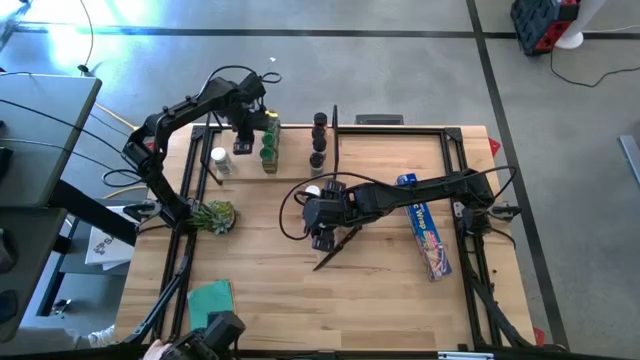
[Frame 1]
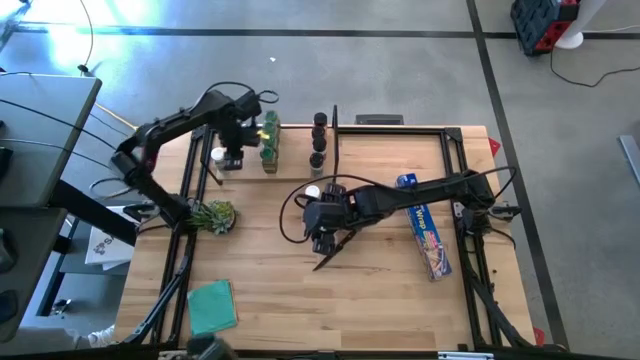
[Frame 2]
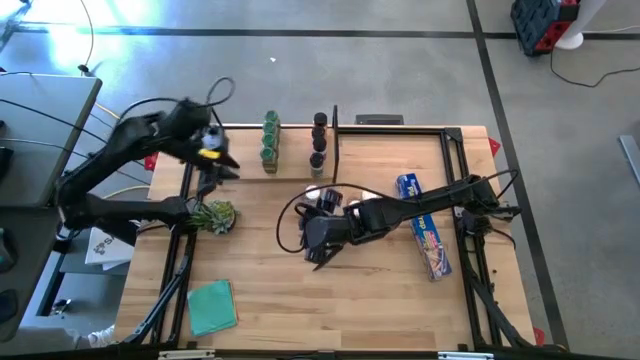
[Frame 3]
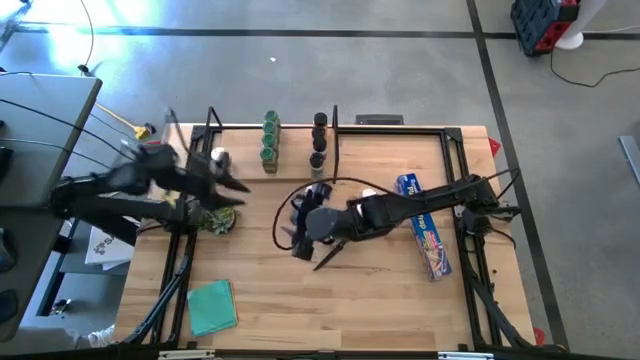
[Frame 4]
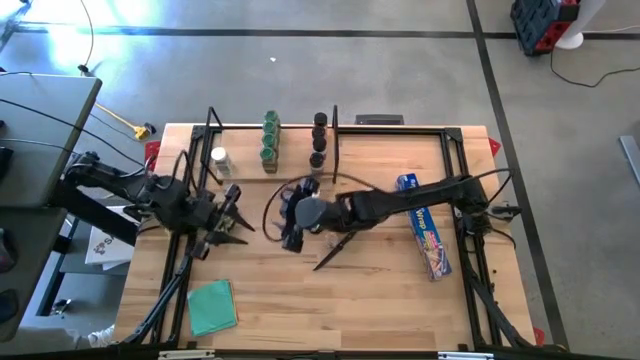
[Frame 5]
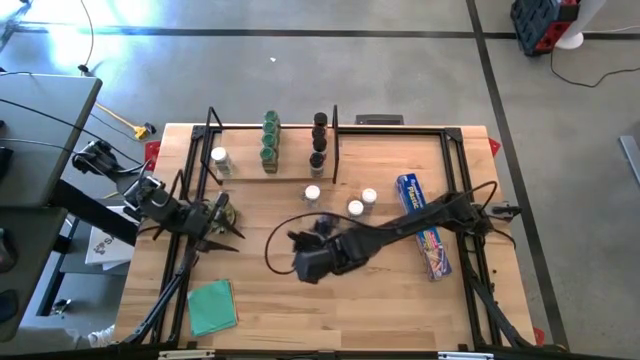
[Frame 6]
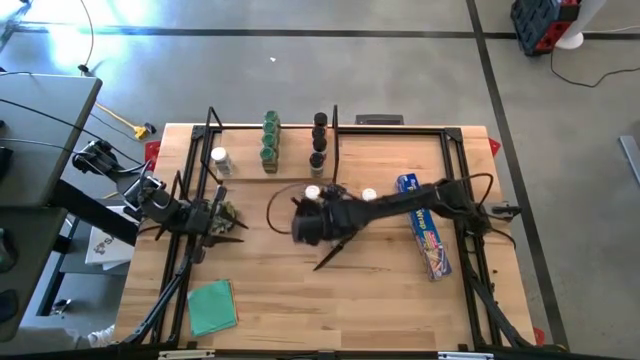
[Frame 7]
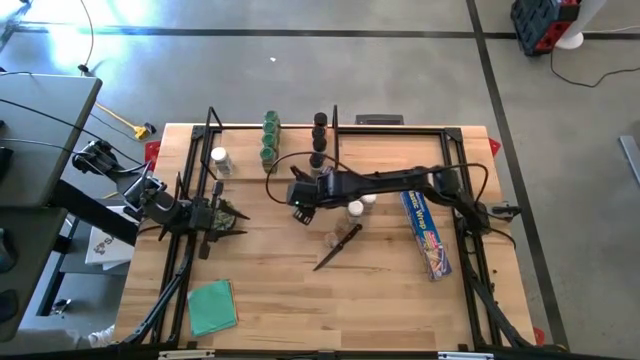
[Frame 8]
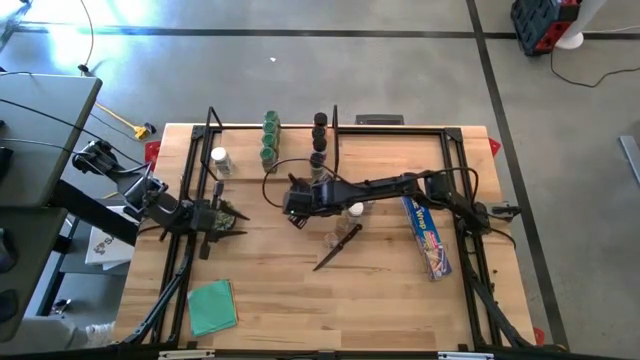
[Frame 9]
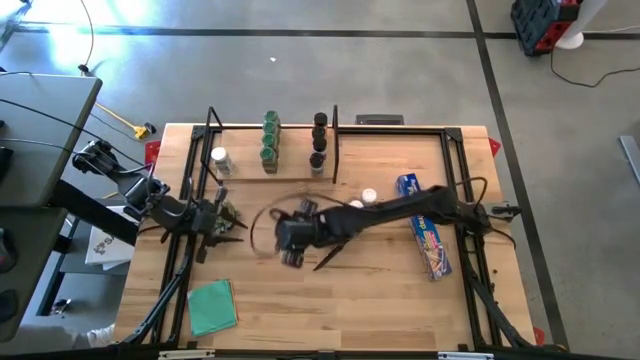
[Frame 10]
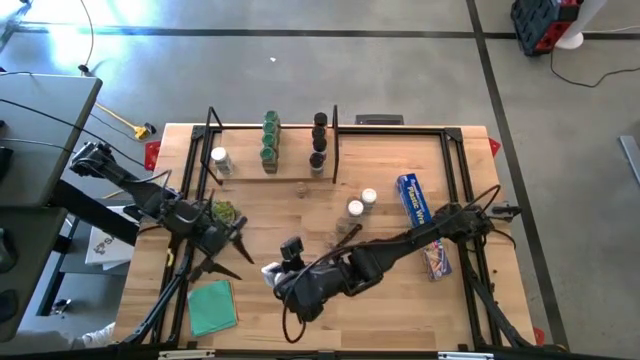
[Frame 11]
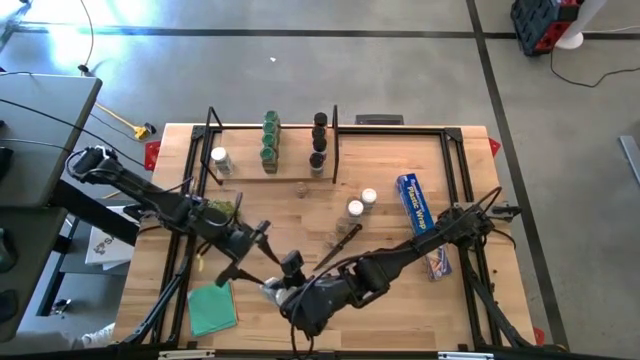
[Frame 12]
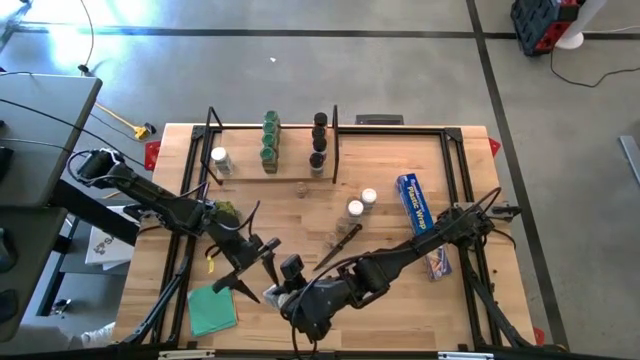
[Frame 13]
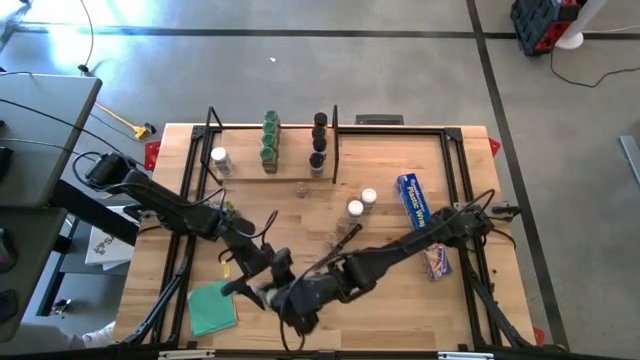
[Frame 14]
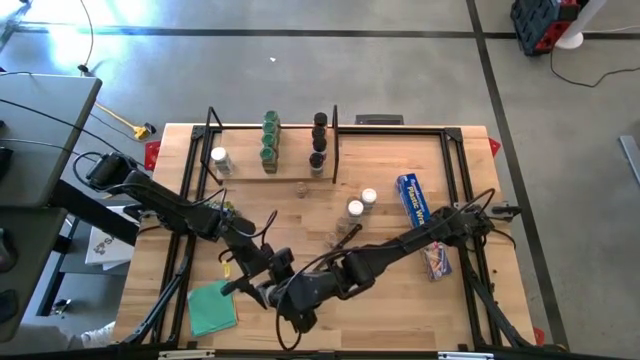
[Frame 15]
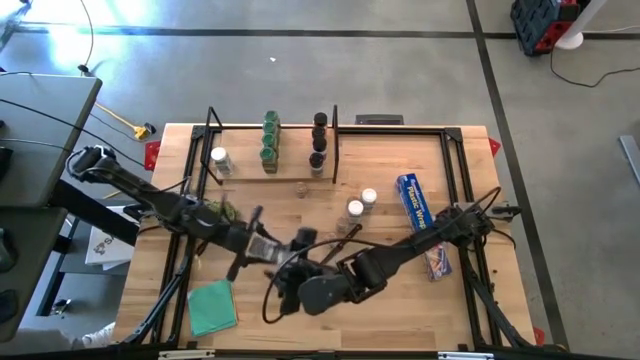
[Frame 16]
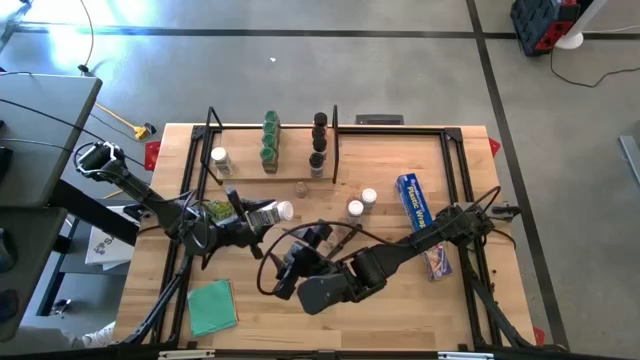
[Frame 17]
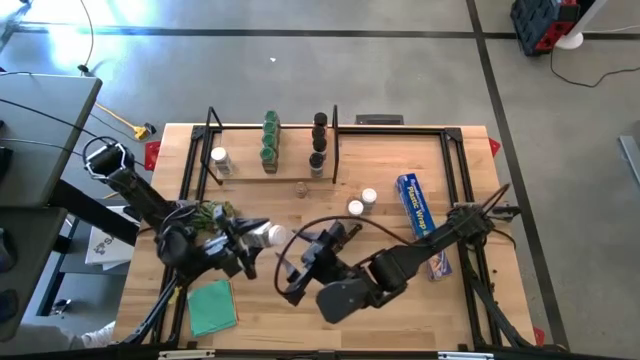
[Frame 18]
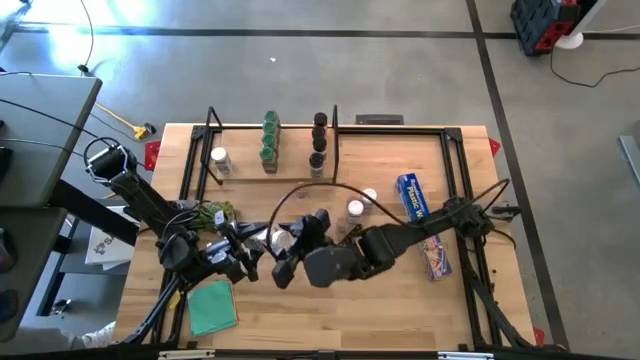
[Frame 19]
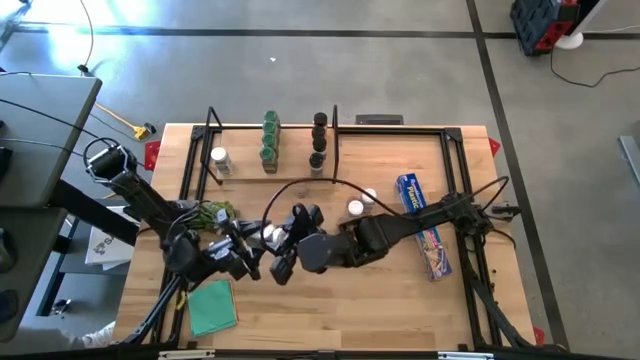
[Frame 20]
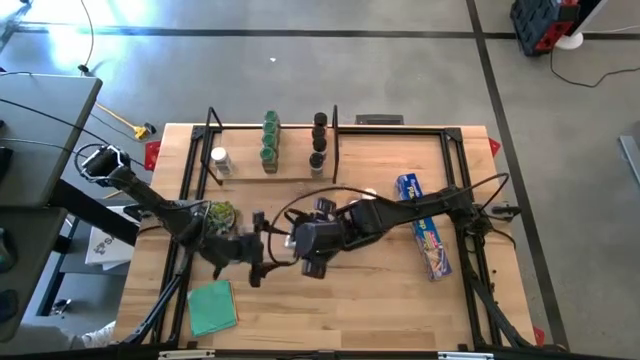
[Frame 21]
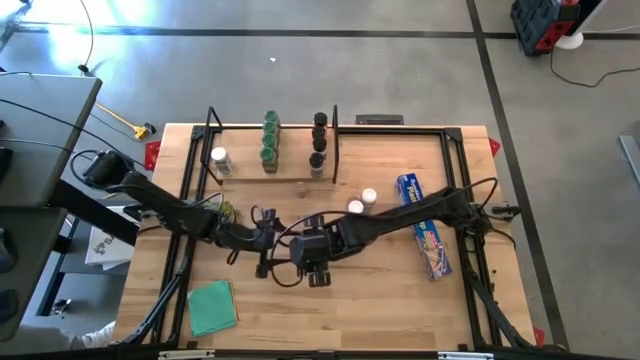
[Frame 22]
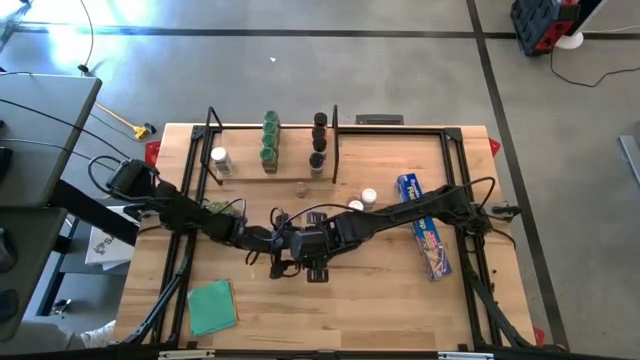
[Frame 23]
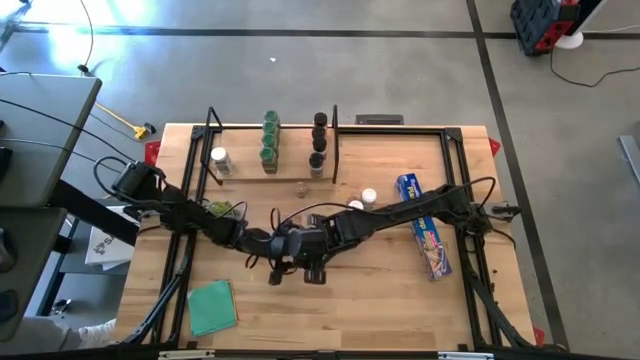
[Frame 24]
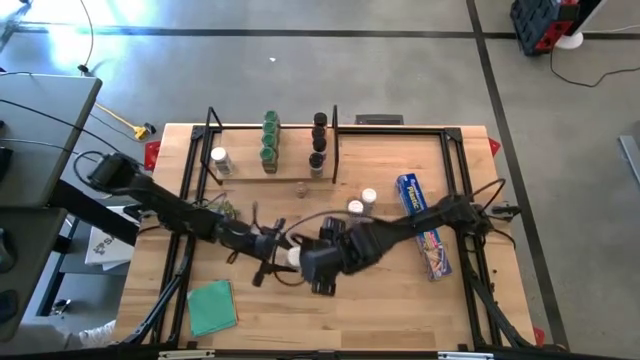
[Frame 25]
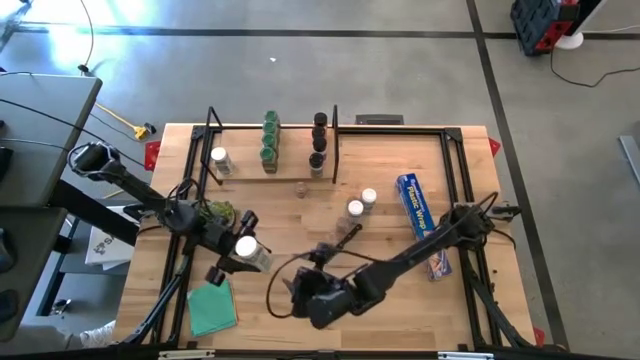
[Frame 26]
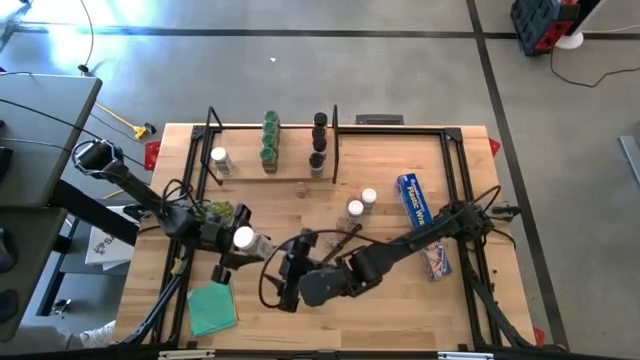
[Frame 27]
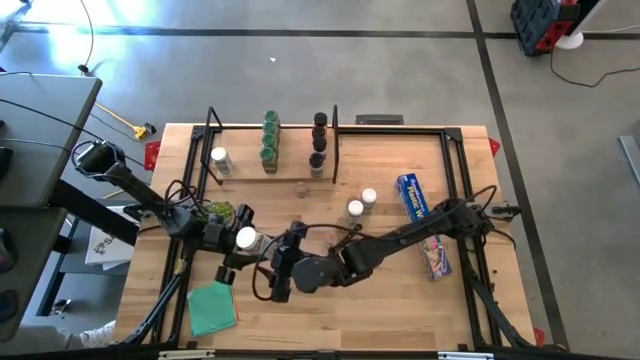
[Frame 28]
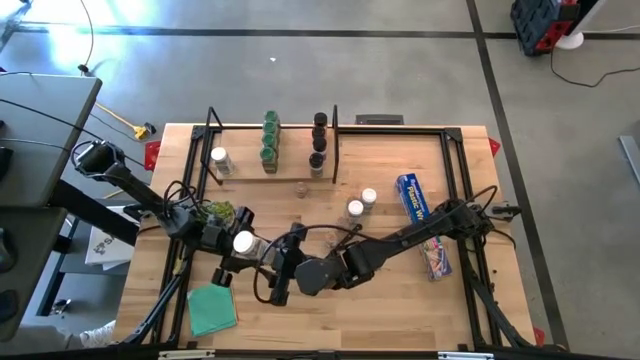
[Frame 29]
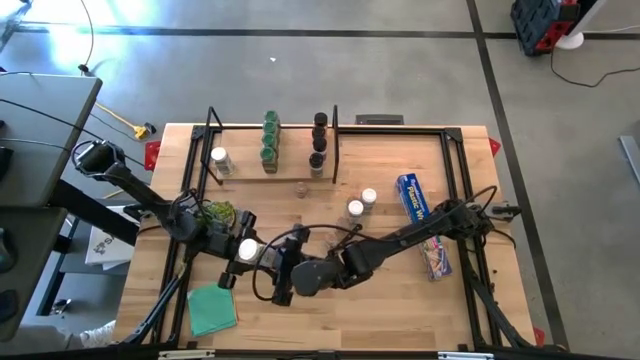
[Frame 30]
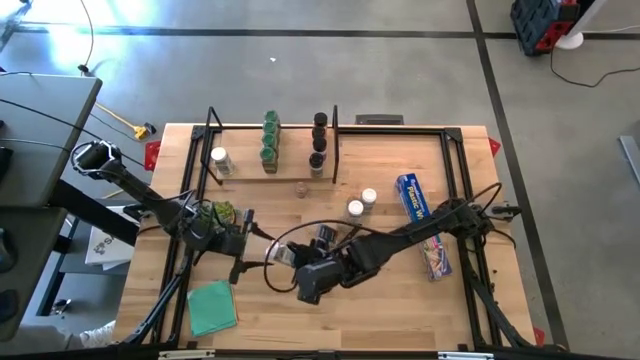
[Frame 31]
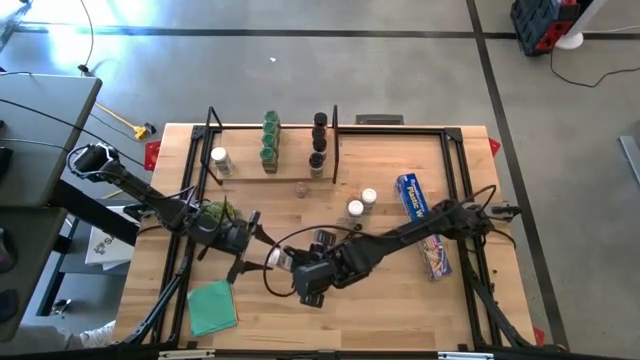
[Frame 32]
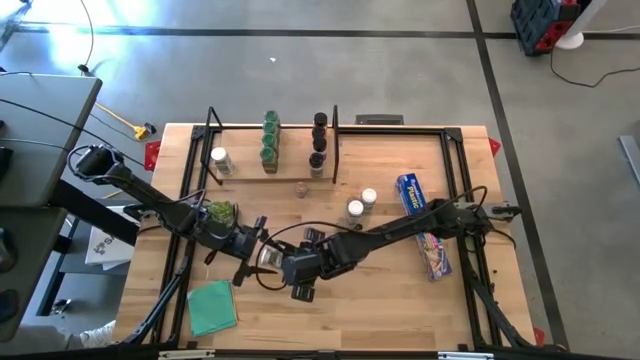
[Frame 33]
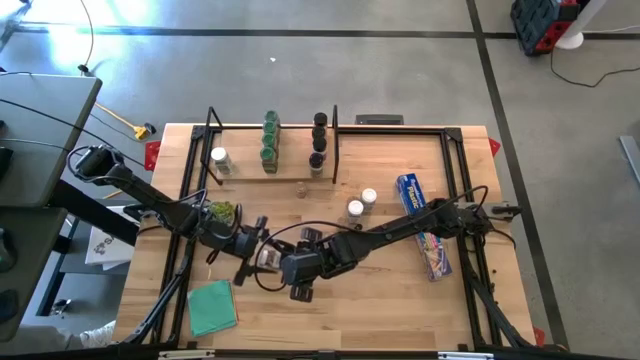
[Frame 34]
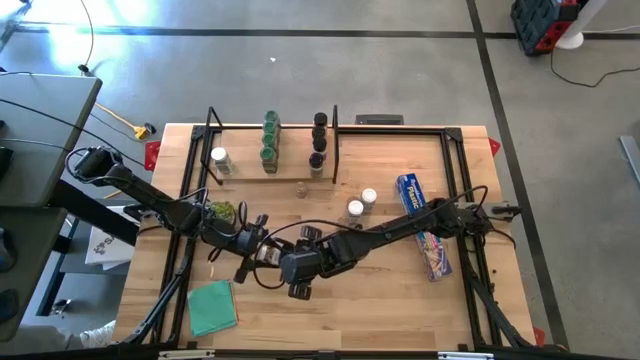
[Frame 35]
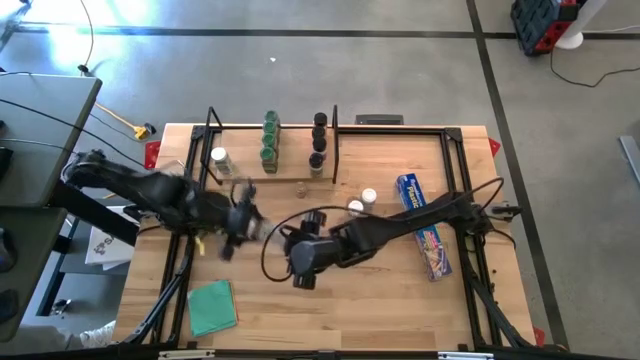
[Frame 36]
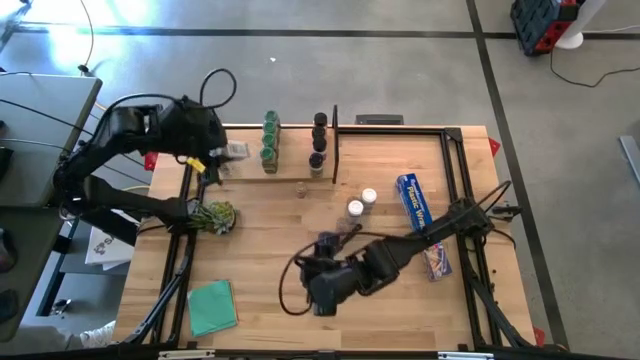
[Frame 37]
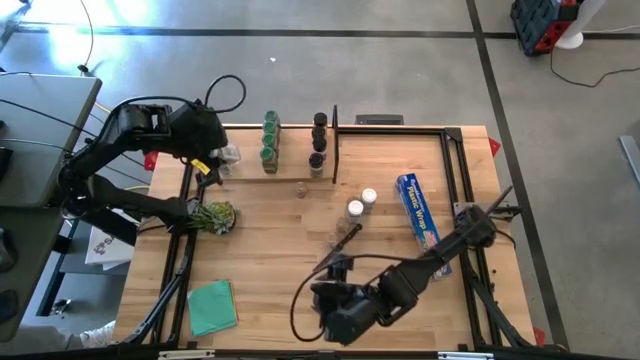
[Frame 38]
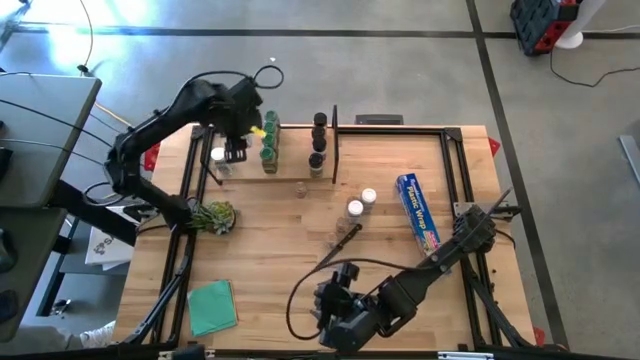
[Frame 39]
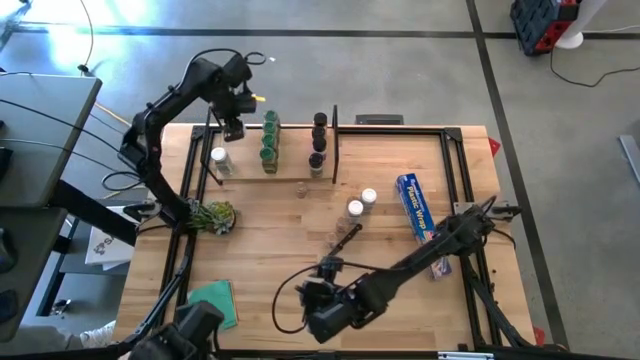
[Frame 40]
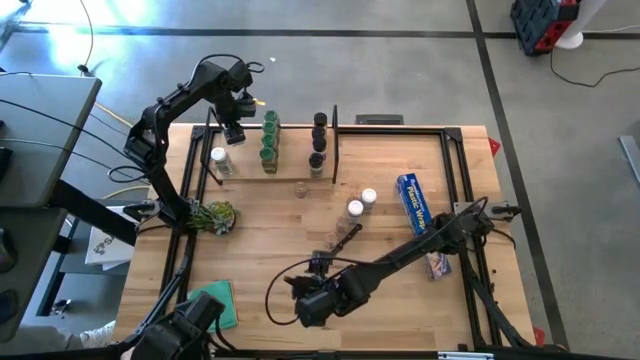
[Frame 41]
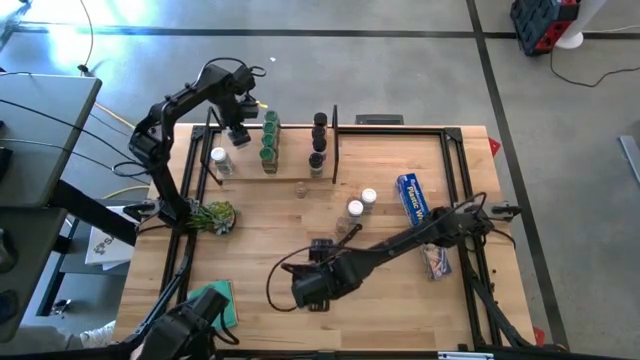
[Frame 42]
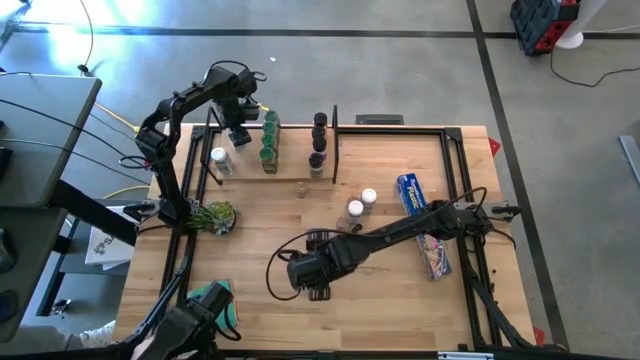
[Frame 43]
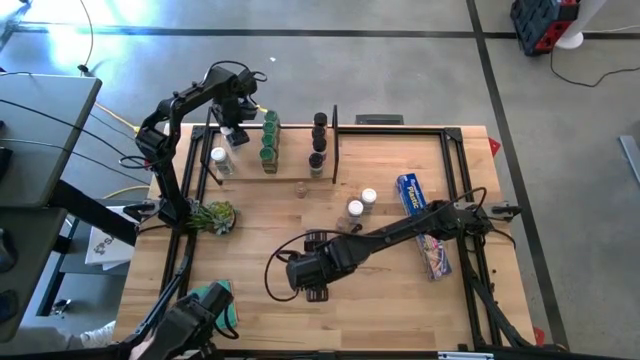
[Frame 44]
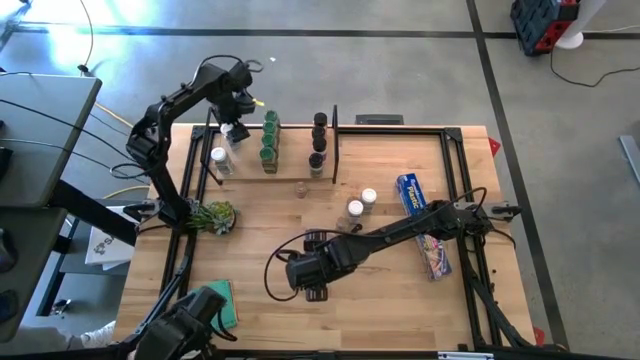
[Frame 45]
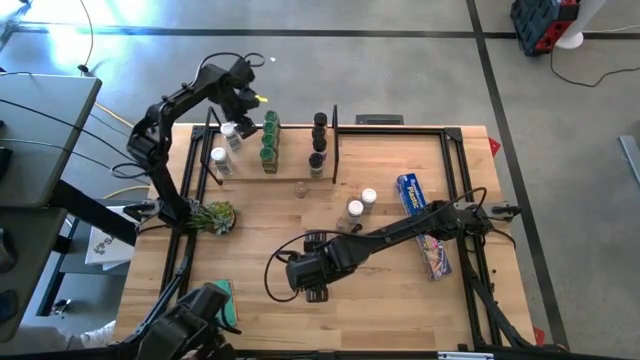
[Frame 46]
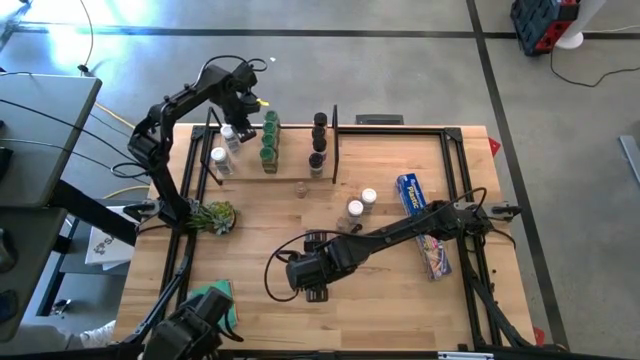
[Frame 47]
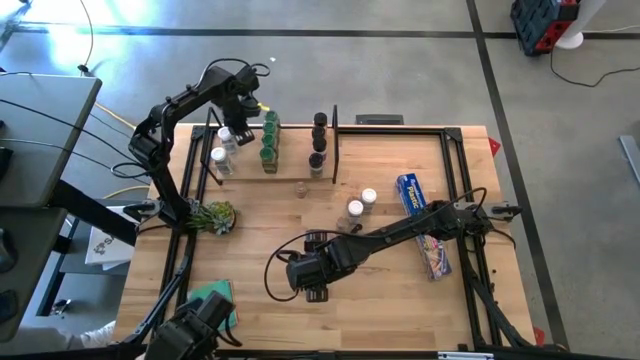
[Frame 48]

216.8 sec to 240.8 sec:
Task: Shelf spices
Put the white lid seasoning bottle on the shelf
